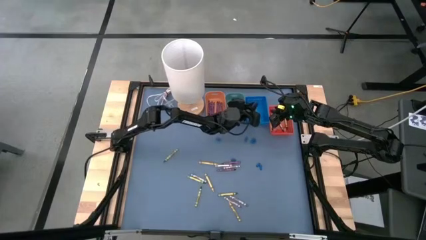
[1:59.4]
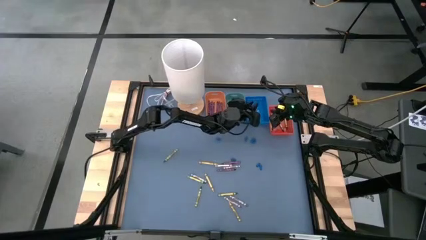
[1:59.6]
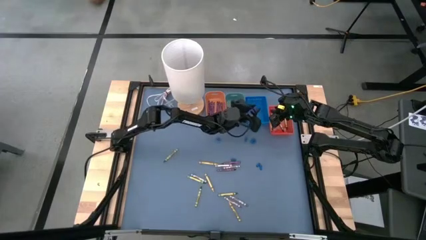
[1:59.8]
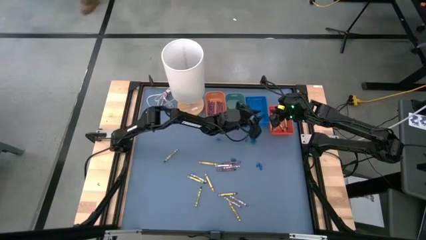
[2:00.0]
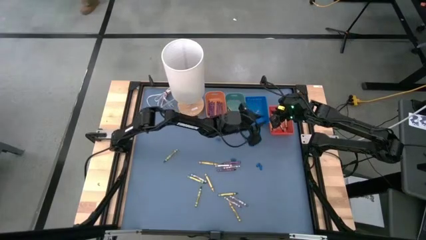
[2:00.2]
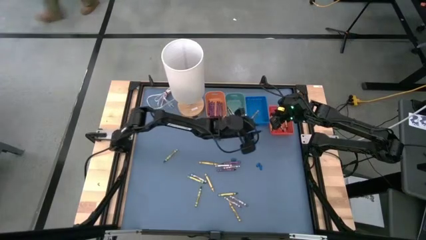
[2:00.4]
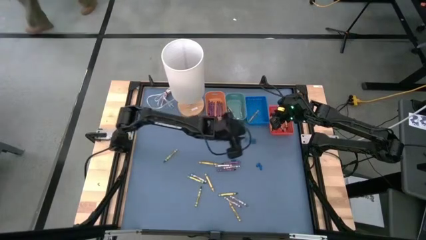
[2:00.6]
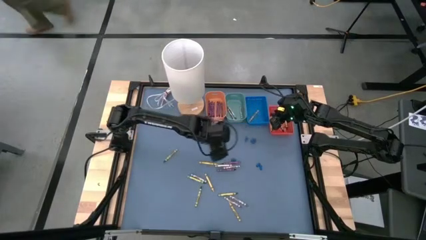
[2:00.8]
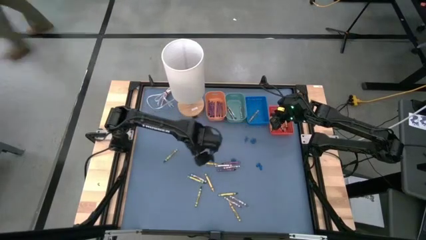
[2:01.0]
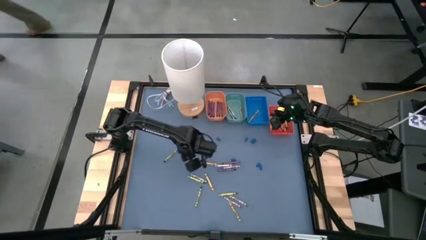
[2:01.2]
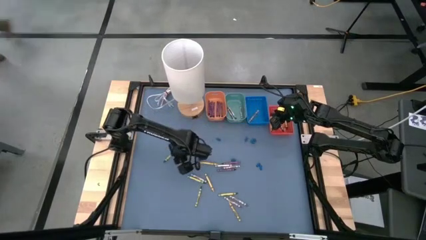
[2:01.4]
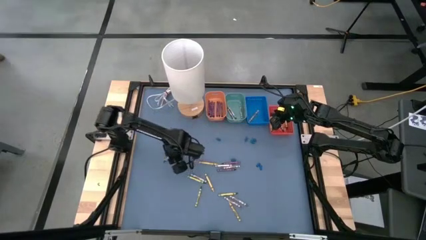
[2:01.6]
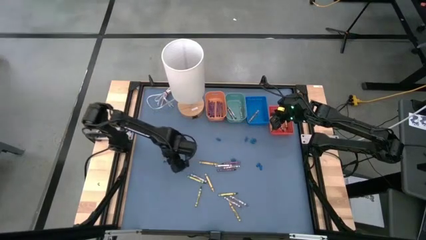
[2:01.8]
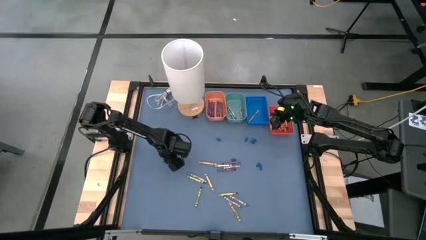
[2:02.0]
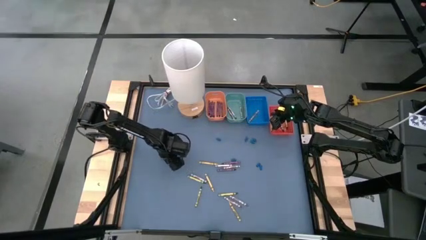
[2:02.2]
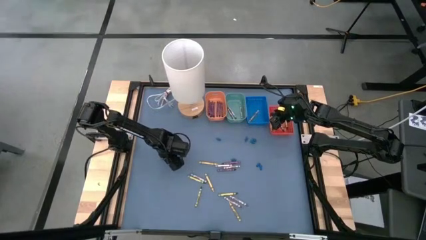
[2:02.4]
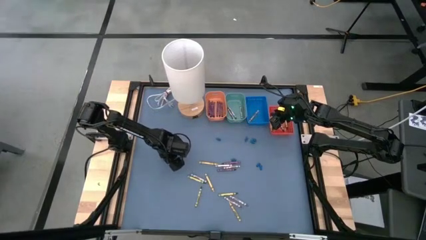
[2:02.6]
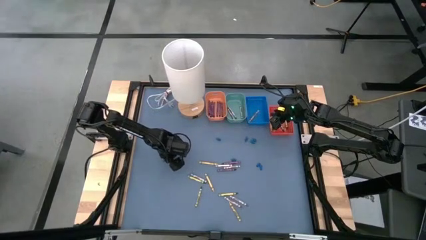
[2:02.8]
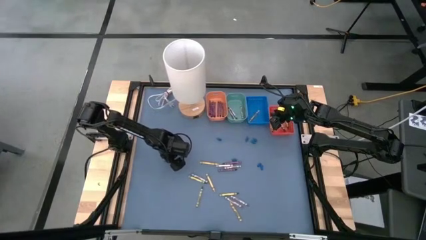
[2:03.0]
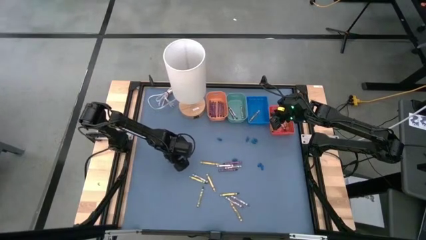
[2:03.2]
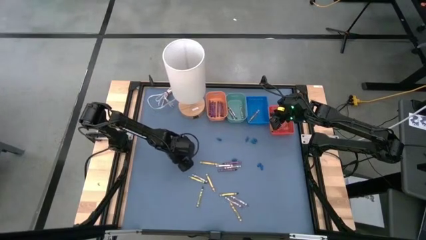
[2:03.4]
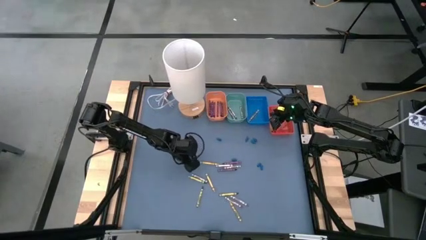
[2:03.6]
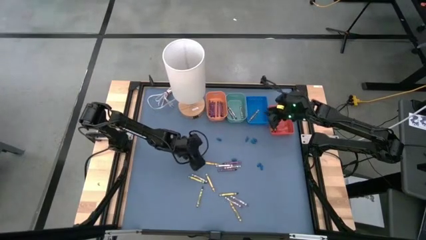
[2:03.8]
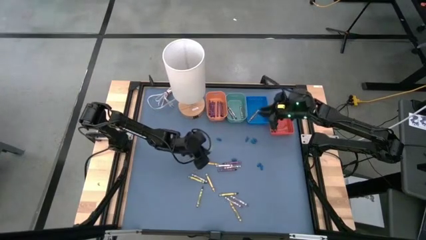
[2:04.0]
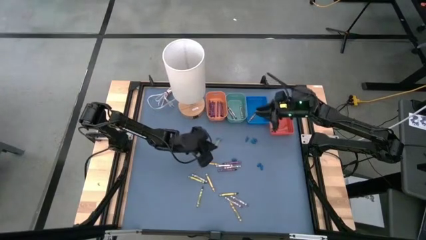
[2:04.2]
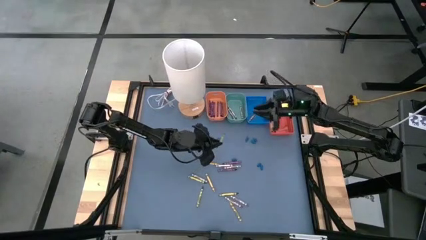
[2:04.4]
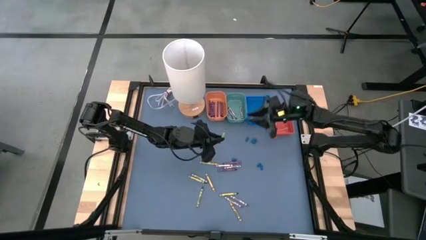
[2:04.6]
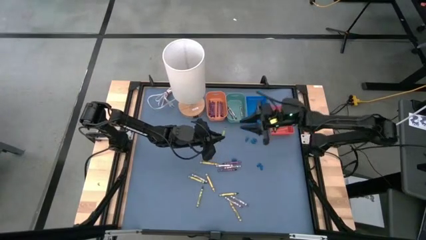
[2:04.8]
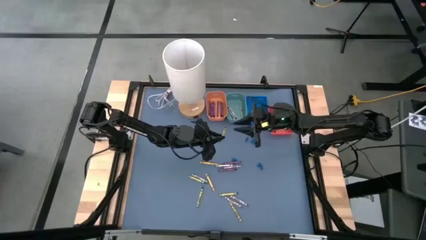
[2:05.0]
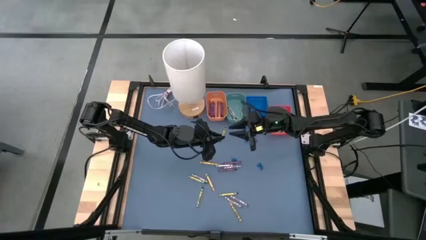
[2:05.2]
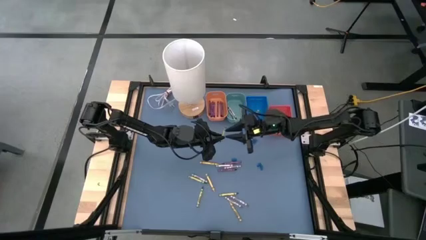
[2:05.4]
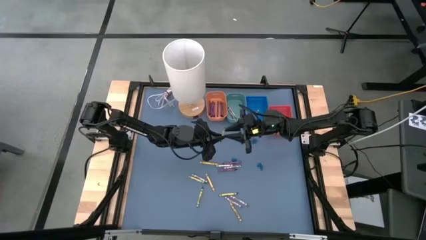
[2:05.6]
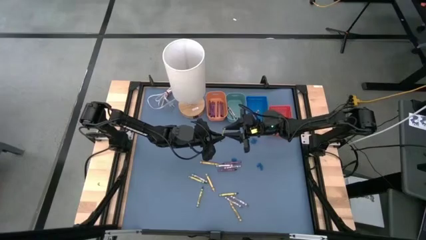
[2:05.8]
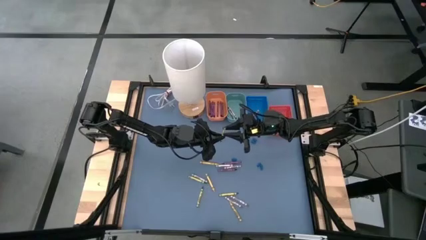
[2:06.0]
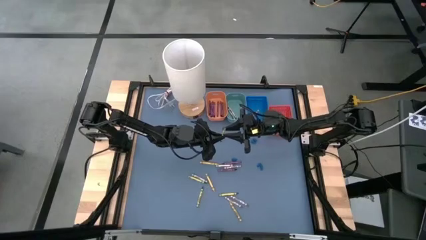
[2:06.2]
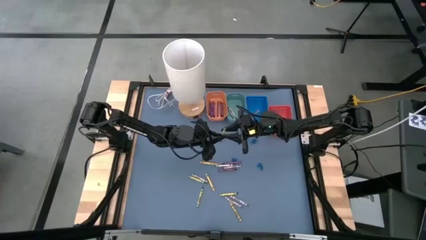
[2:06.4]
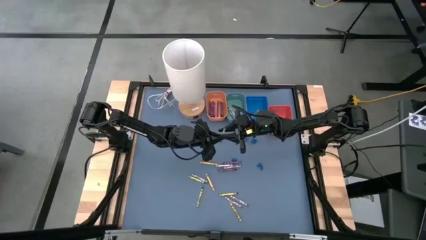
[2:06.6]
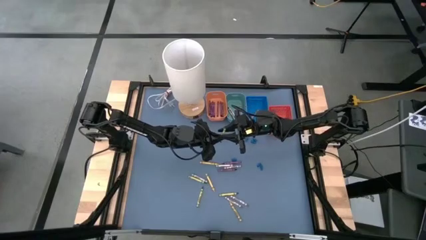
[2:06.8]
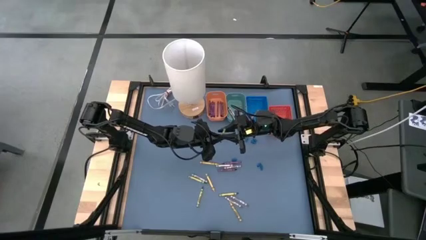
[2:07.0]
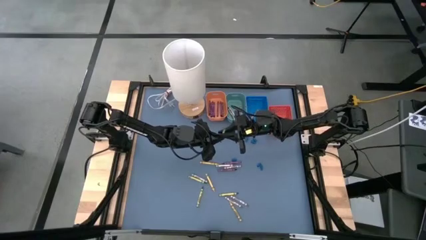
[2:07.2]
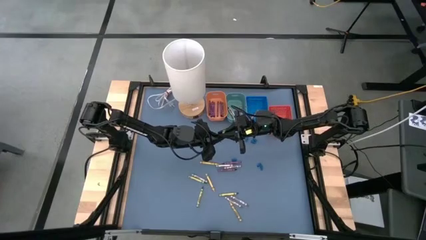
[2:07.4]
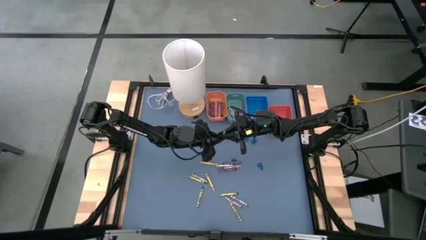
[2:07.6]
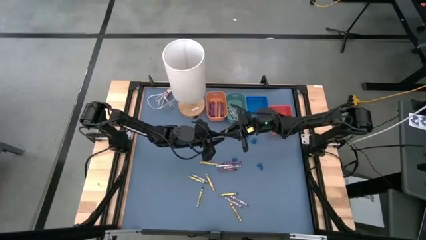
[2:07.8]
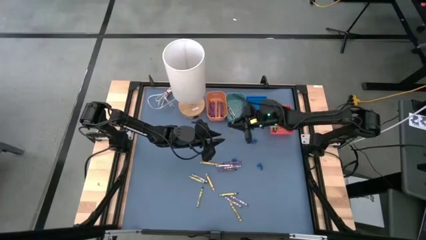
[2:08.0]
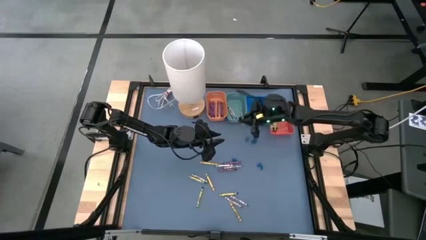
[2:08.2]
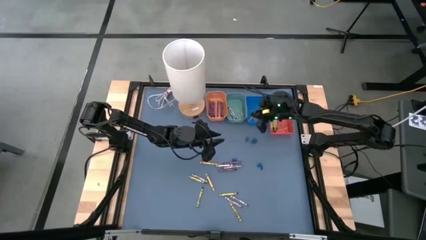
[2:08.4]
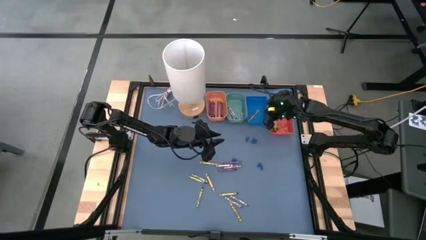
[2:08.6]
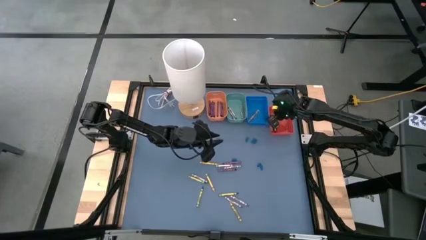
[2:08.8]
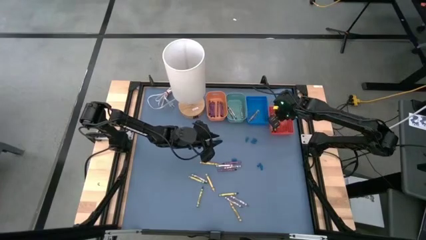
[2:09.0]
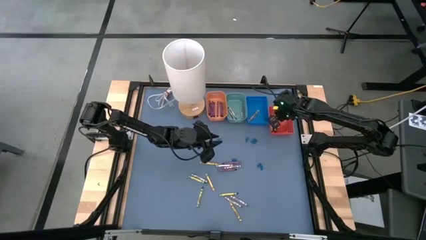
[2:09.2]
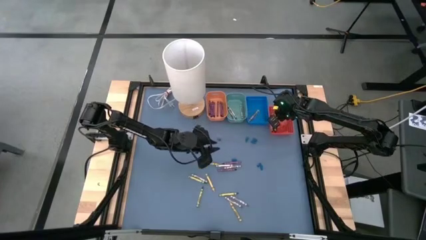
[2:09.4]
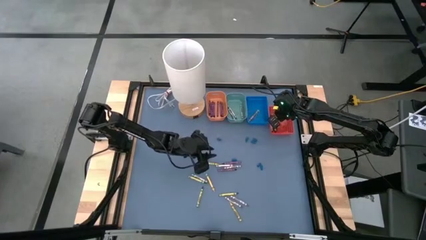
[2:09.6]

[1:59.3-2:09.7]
Task: Sort crayons
Put the green crayon into the orange bin

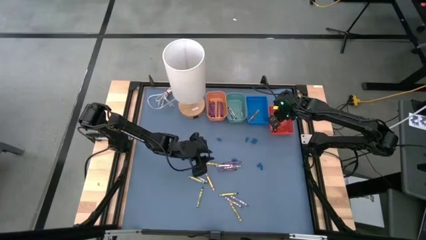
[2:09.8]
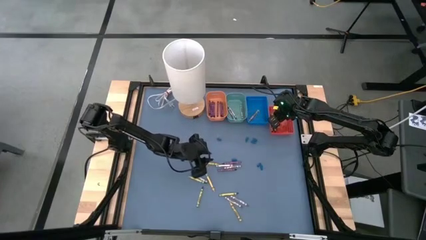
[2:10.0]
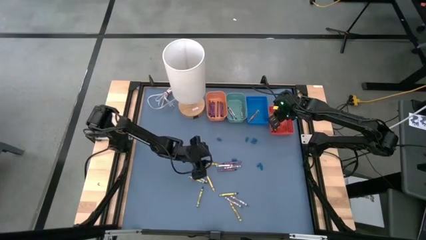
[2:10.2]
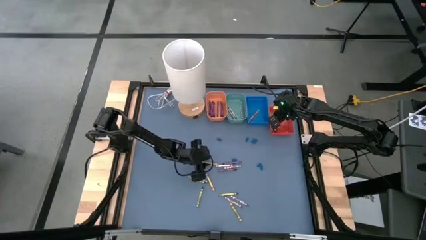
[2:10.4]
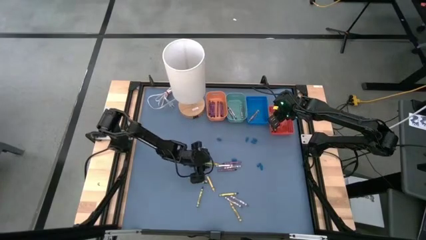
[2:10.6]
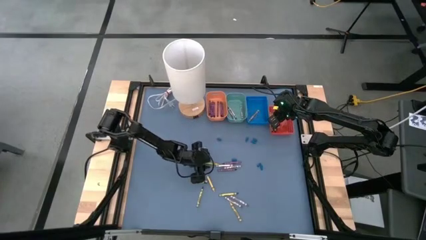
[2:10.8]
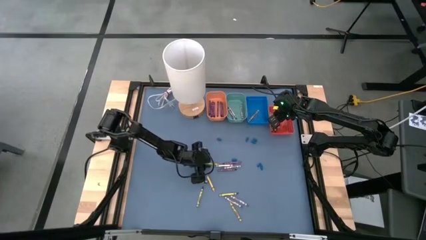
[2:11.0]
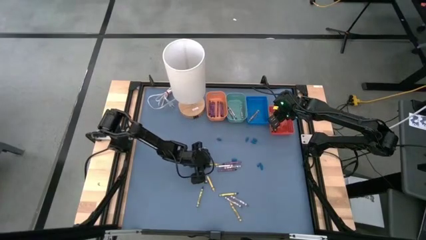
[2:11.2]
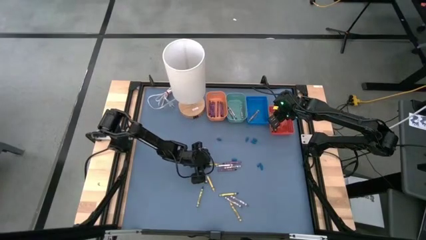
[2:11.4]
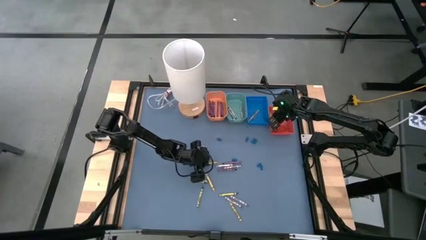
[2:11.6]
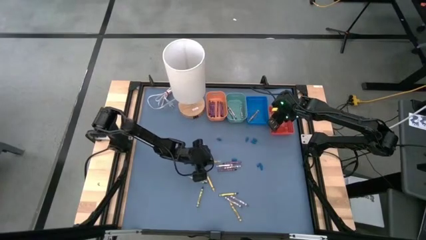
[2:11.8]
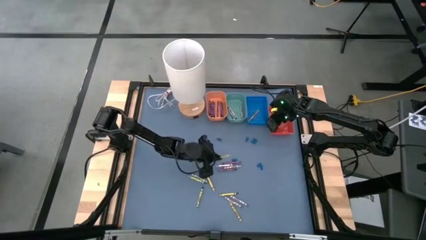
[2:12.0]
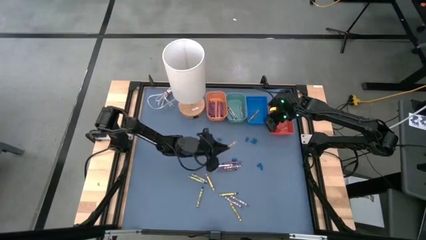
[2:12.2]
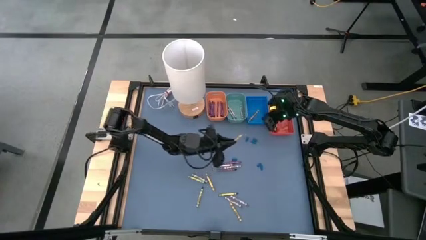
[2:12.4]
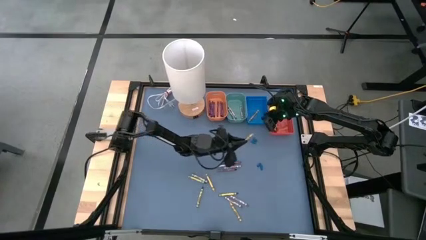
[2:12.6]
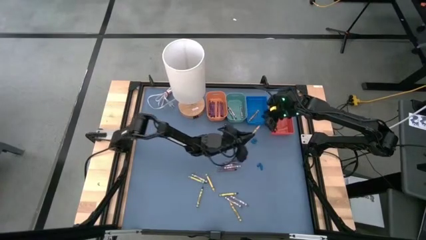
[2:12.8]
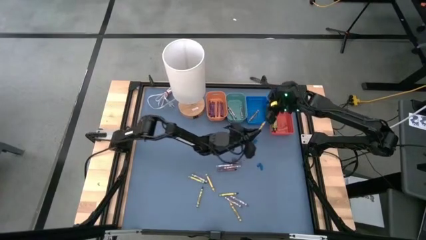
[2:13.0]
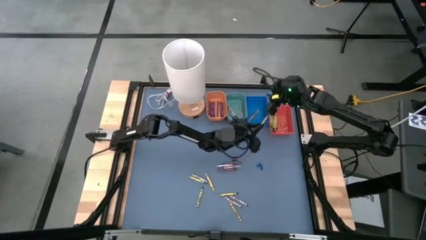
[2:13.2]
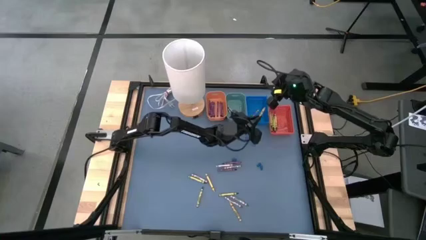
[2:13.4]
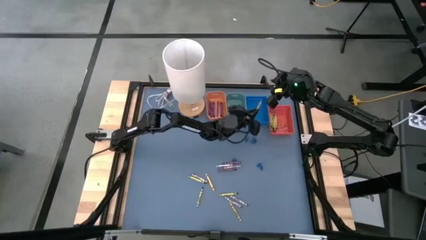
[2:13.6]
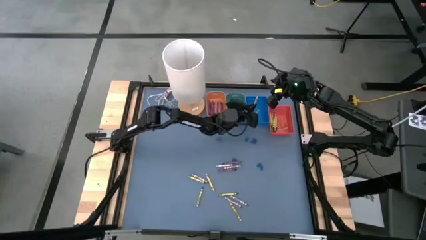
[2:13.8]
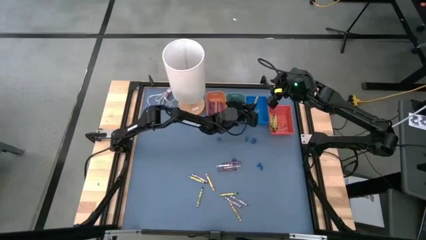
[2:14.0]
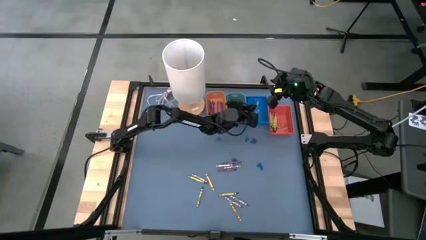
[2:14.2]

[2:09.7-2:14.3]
Put the yellow crayon into the blue bin

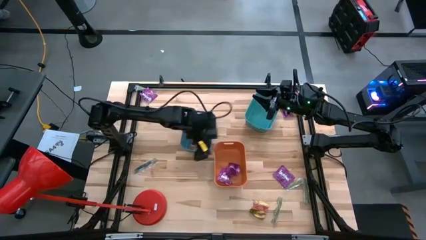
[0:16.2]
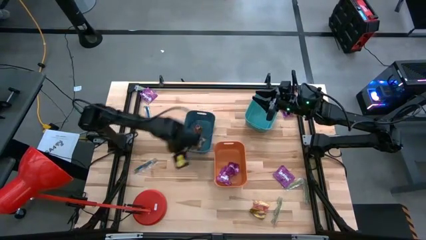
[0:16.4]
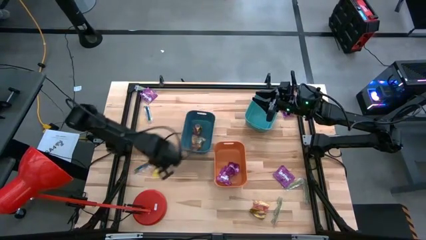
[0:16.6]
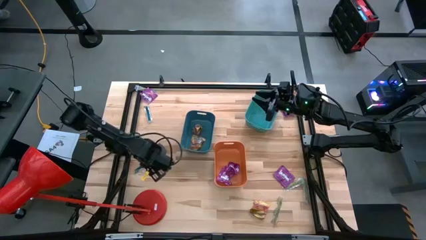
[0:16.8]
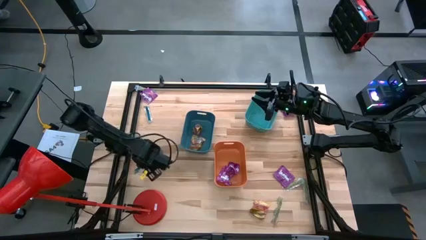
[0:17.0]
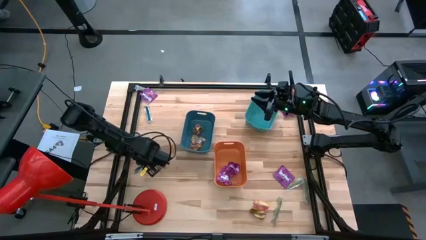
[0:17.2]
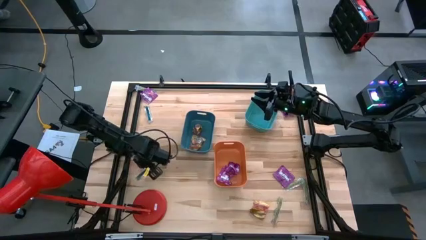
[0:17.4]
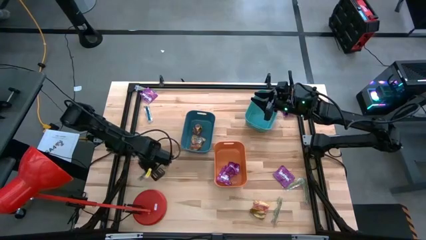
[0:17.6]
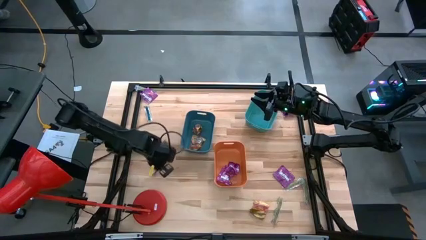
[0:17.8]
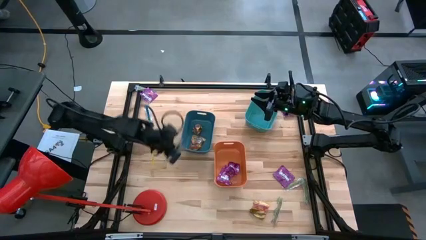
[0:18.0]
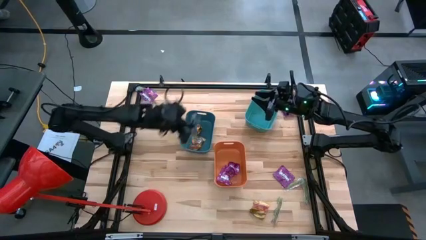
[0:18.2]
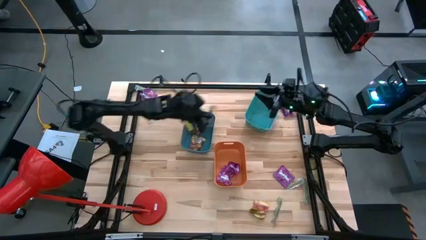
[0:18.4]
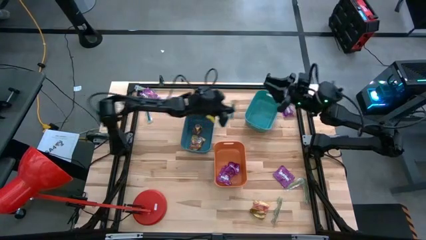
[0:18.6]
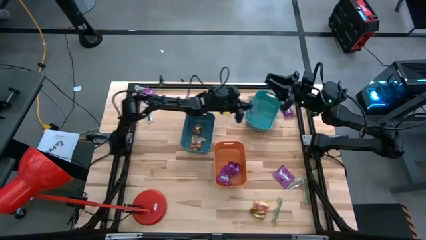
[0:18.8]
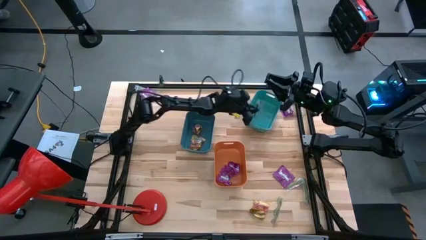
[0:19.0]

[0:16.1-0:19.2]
Task: Sort candy
Put the green gummy into the green bin
